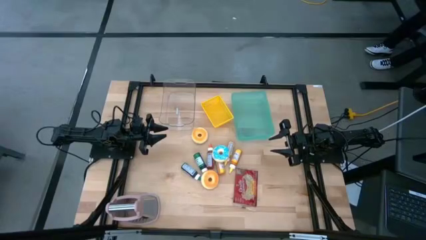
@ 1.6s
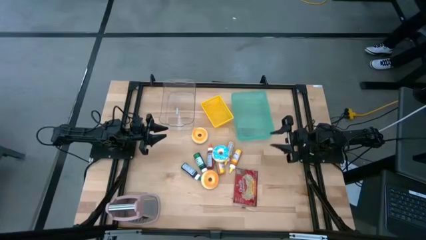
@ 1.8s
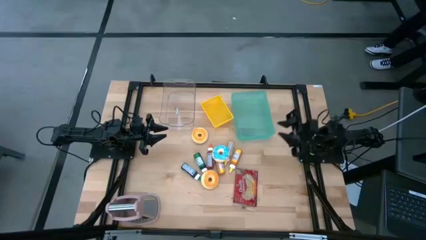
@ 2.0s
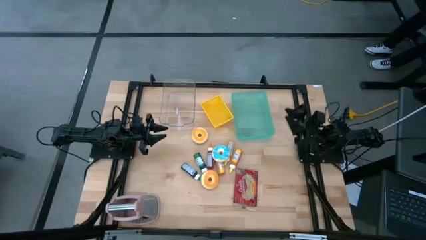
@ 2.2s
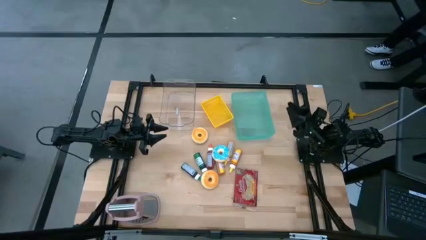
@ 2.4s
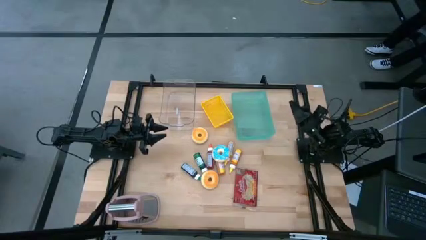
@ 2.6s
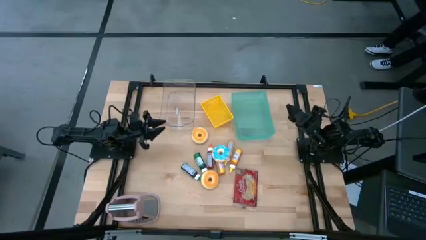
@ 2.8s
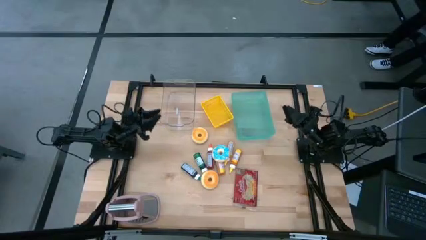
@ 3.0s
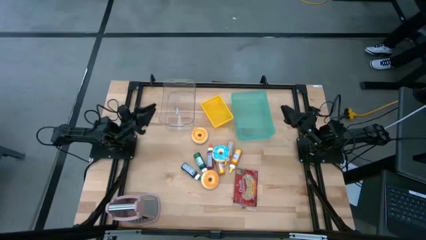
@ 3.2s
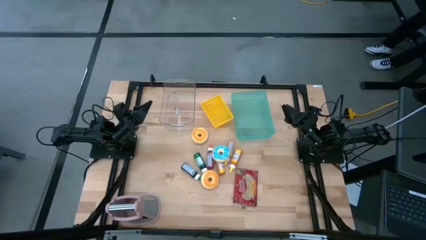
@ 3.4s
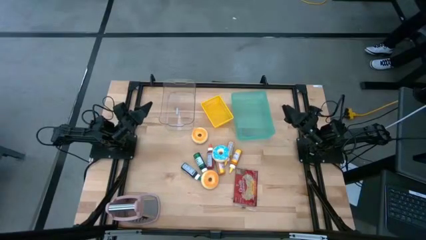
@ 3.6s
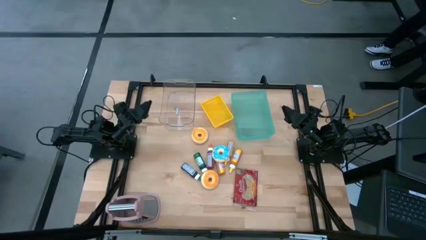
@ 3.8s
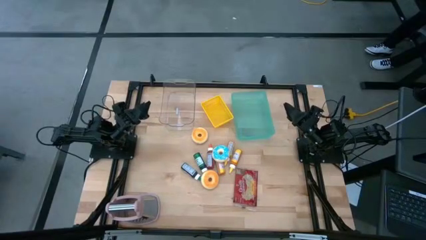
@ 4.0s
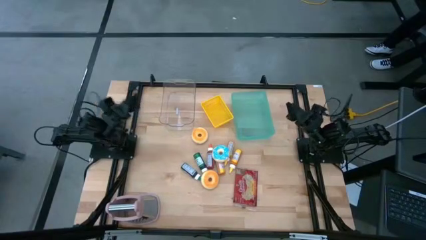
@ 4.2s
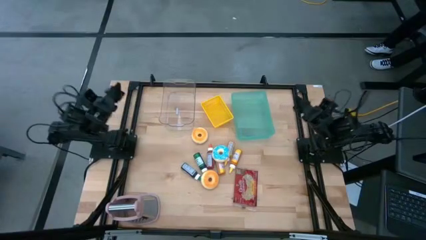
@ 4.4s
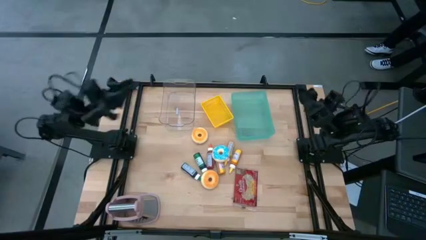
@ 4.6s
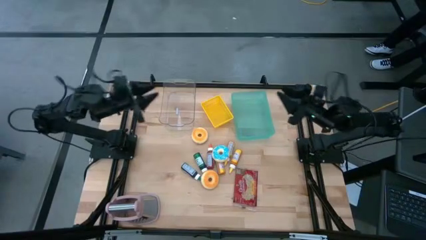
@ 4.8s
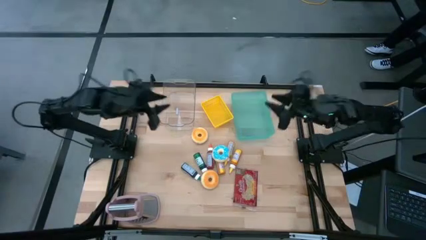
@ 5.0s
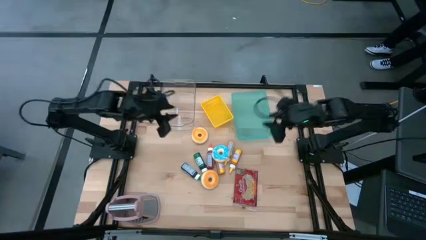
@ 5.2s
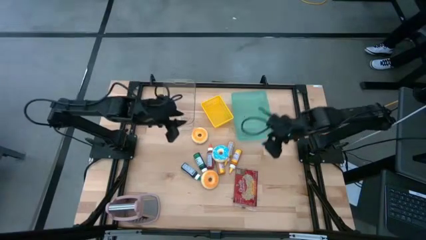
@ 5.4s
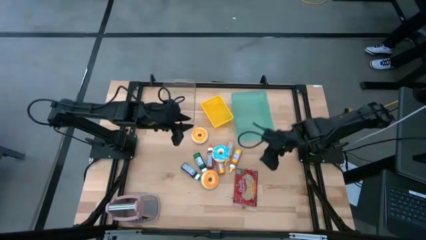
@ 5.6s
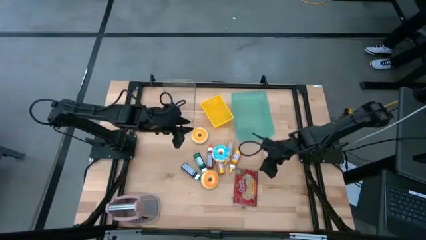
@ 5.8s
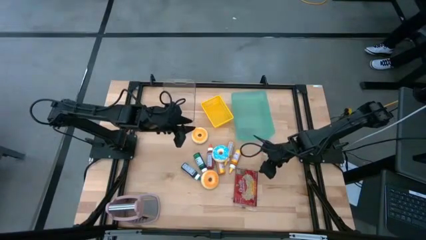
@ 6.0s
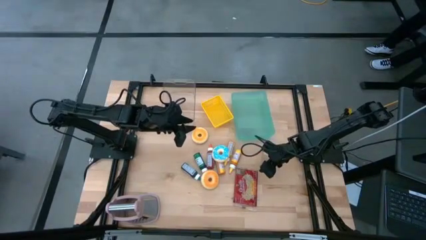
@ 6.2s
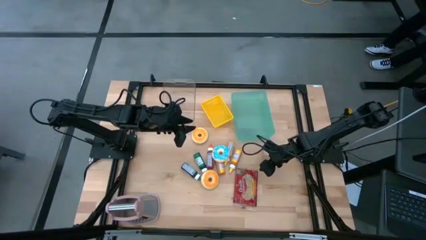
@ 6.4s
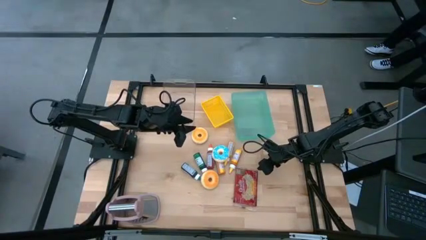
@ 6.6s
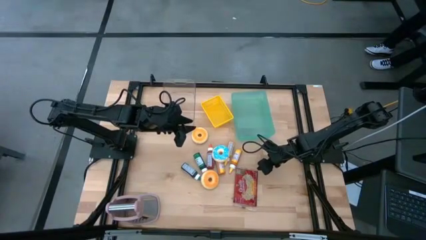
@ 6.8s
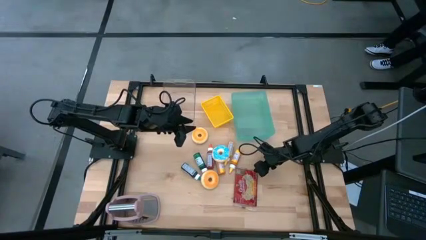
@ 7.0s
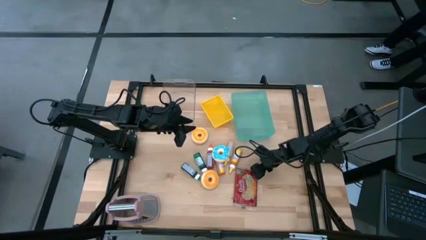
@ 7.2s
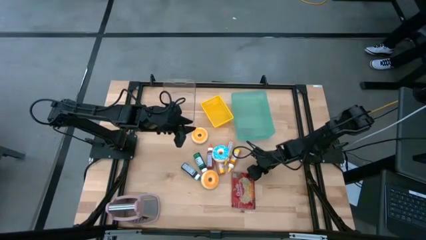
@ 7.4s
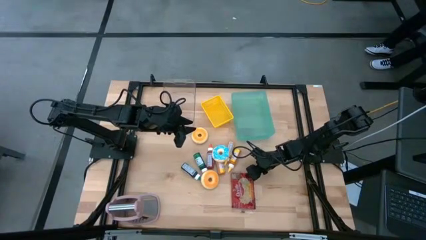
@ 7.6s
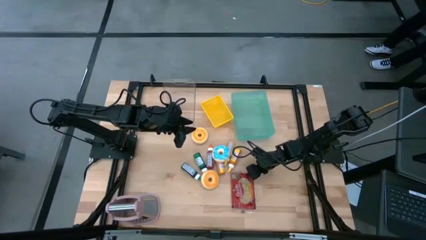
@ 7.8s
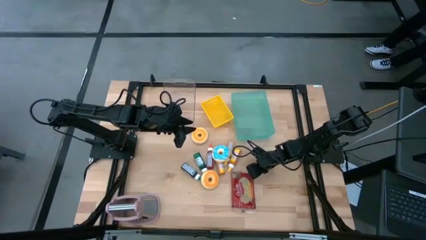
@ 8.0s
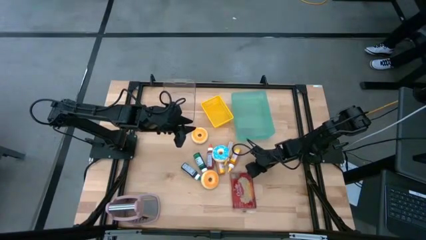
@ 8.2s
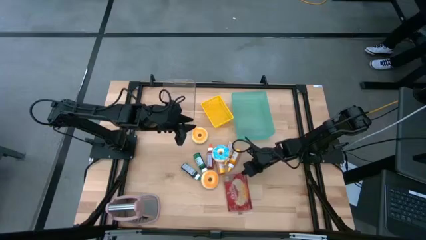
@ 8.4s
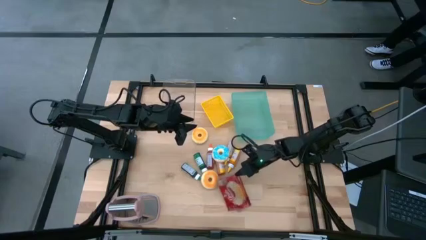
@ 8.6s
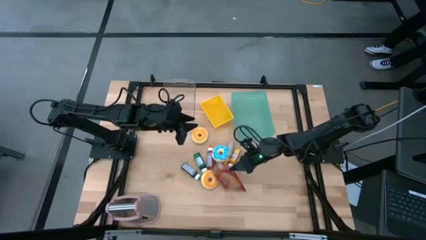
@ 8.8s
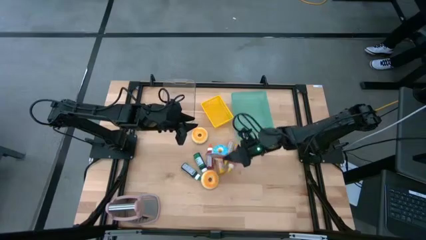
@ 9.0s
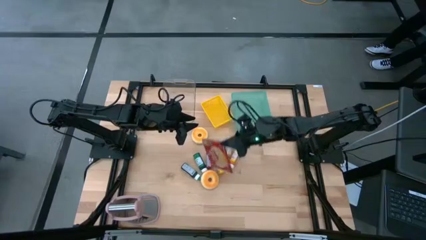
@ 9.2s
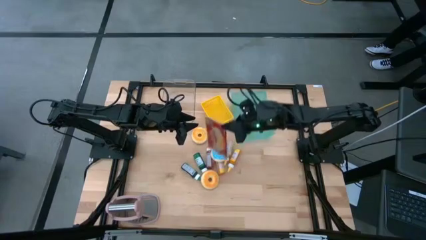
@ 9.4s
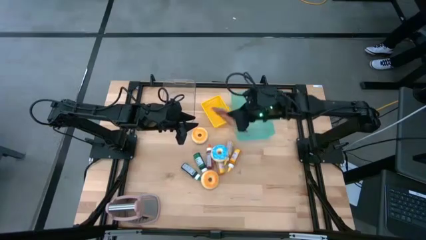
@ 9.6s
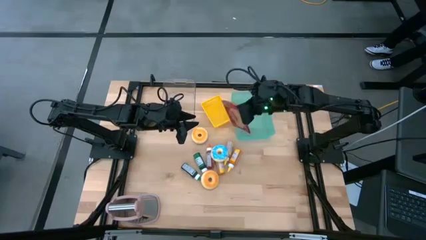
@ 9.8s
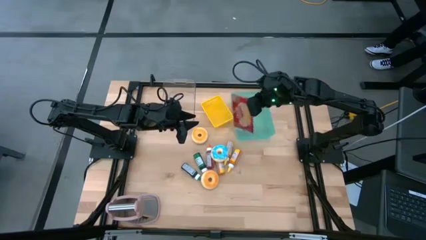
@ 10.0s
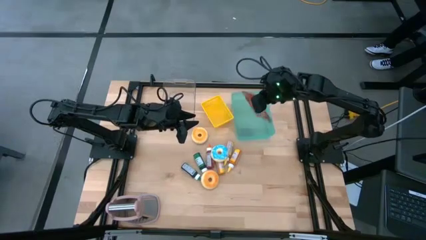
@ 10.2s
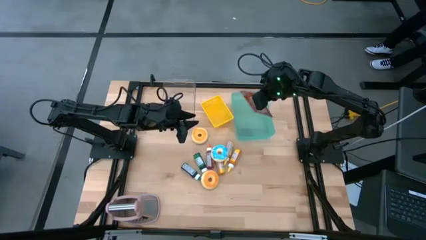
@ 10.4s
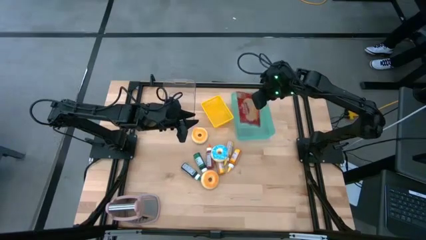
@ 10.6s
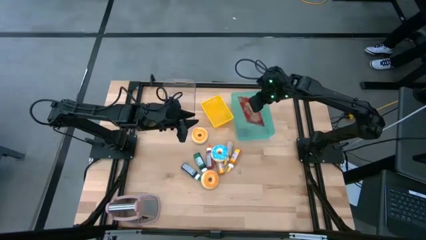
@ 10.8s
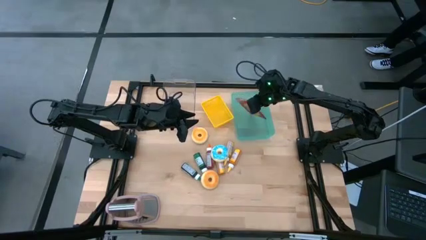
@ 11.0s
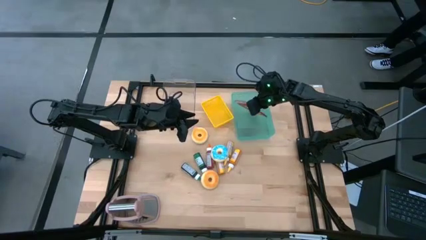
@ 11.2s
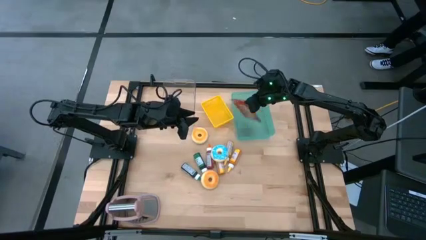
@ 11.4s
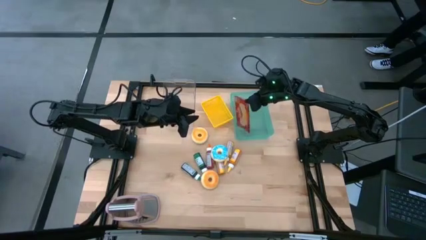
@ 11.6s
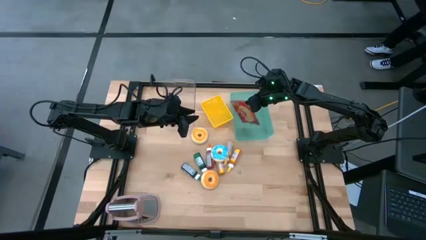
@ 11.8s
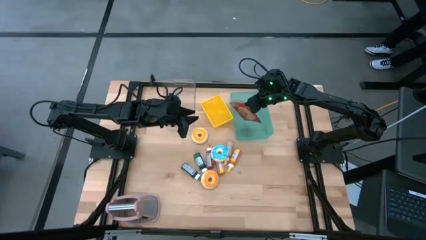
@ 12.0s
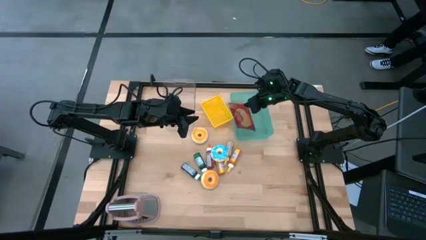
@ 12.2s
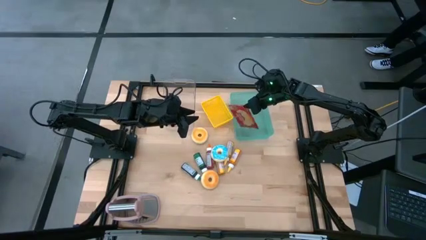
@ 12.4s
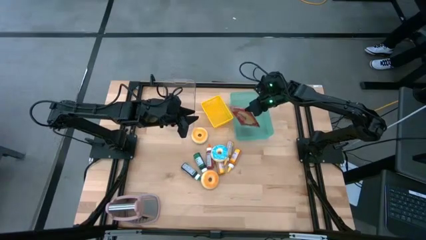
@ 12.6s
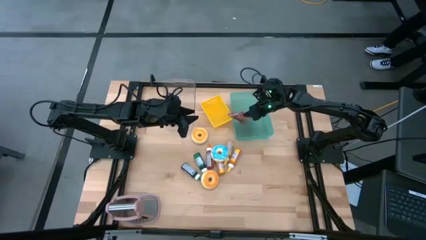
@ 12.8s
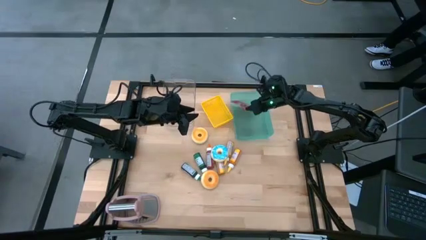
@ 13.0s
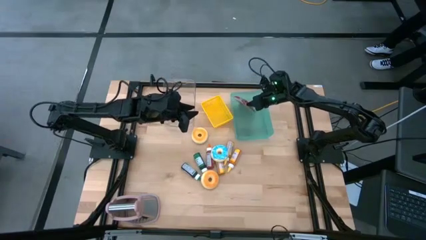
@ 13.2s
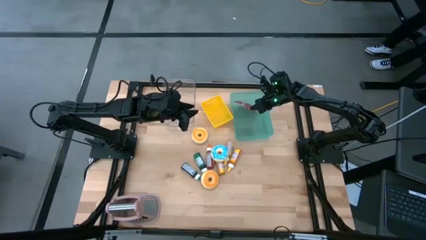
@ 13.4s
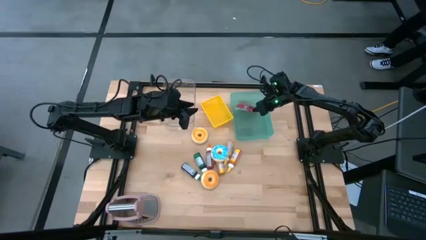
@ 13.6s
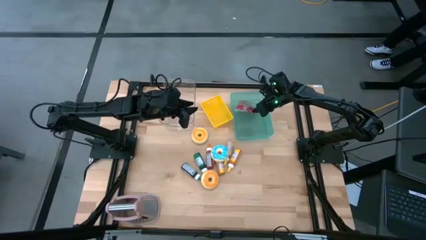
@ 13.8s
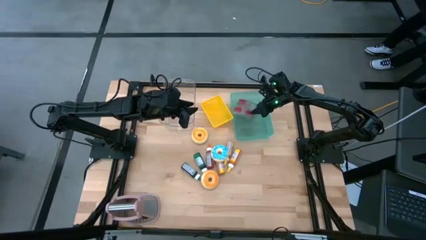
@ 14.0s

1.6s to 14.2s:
Put the red popcorn bag into the green bin

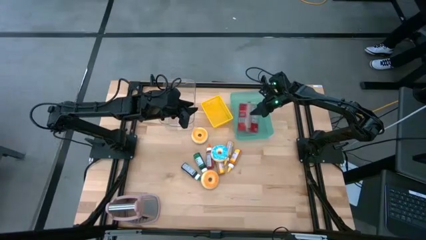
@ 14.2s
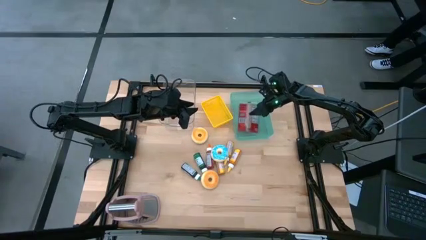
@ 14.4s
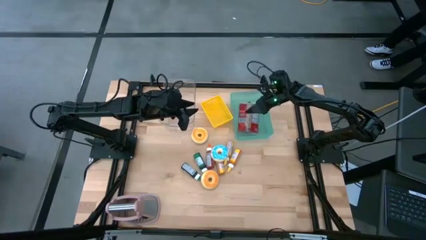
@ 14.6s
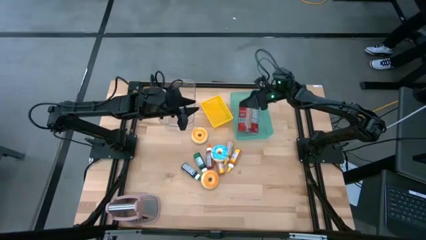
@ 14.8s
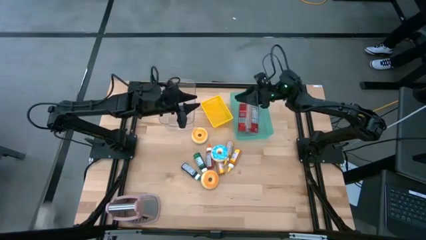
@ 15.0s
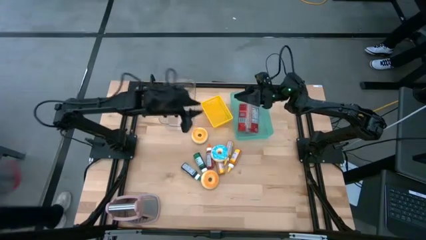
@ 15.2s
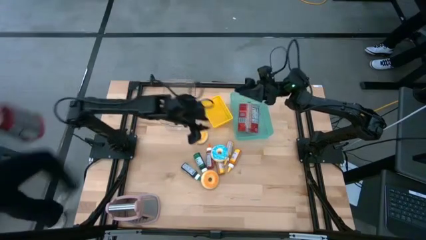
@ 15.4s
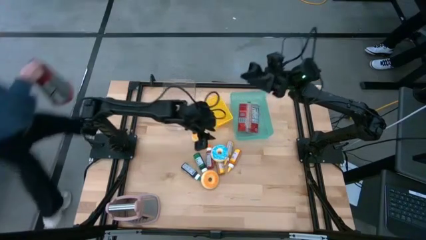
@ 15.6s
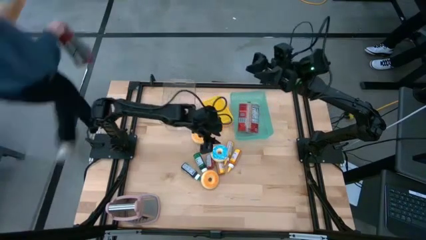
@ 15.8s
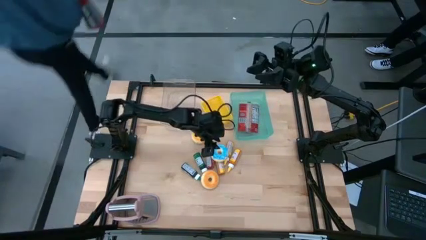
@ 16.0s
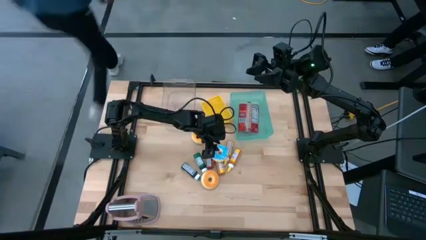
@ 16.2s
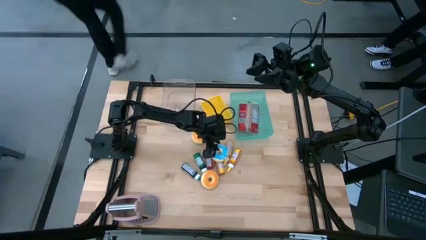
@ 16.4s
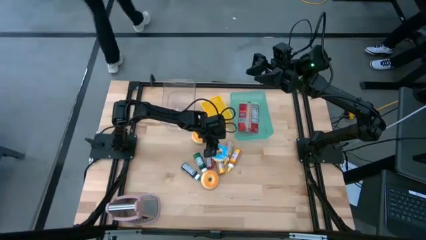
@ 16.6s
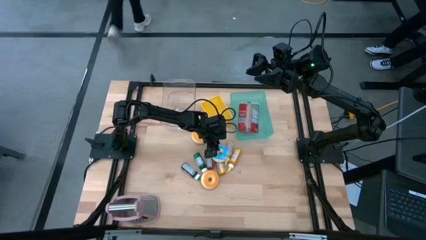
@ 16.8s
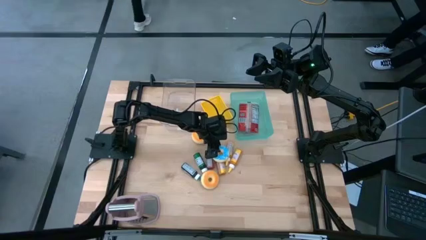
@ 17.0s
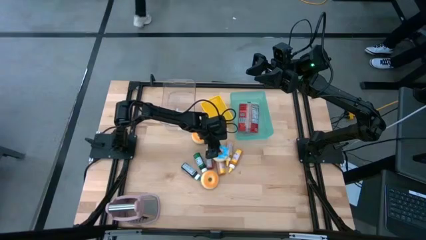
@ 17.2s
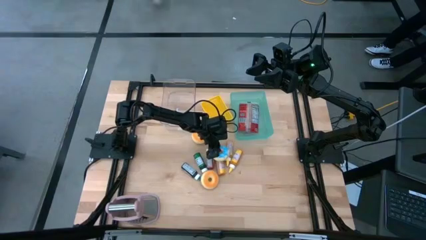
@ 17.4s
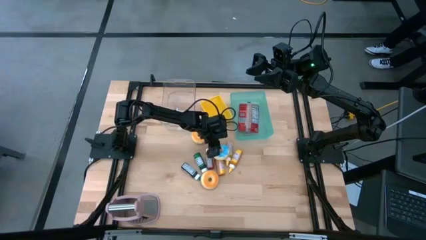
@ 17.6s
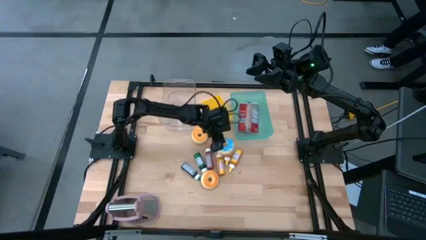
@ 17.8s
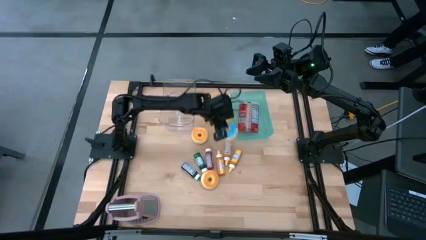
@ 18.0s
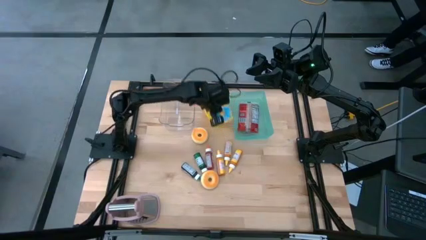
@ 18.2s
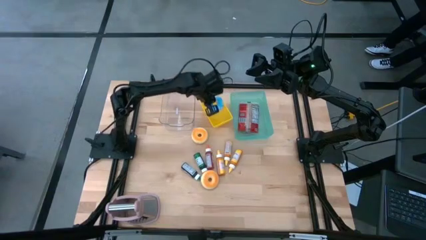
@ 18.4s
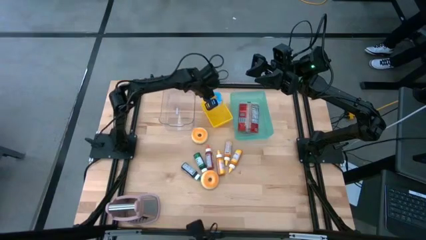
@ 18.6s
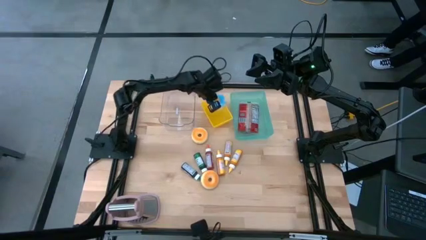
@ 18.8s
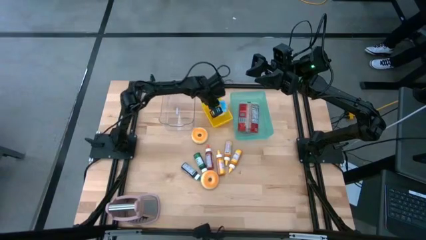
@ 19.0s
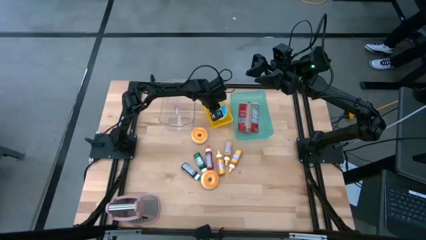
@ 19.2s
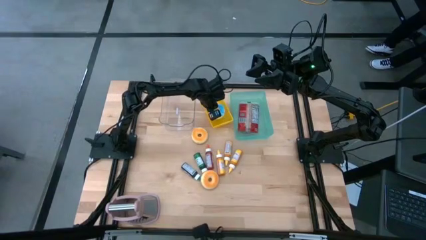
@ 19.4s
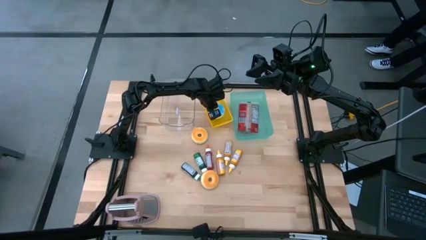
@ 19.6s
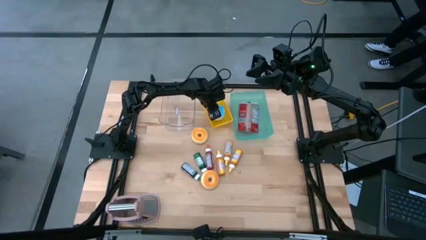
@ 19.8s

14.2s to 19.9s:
Put the blue donut into the yellow bin
